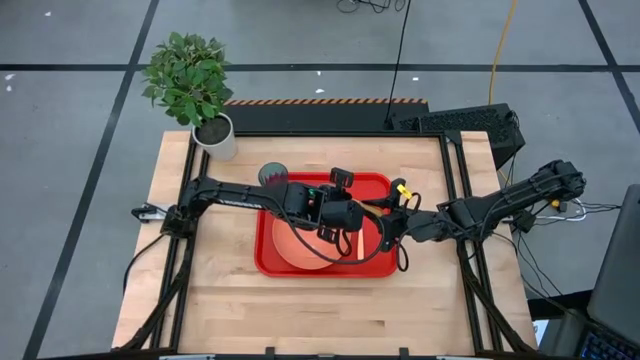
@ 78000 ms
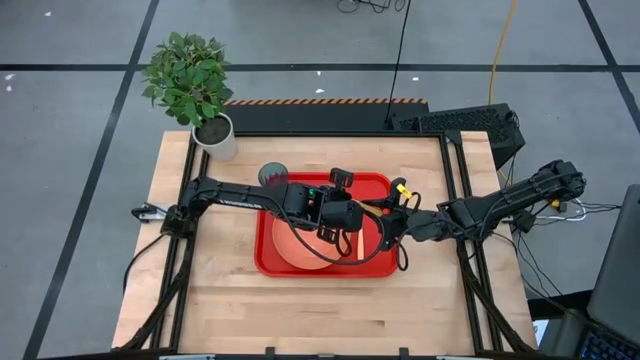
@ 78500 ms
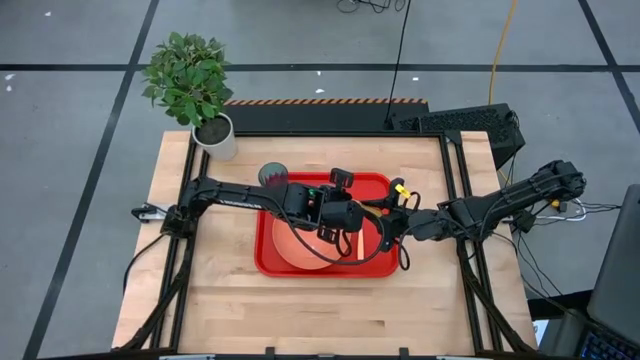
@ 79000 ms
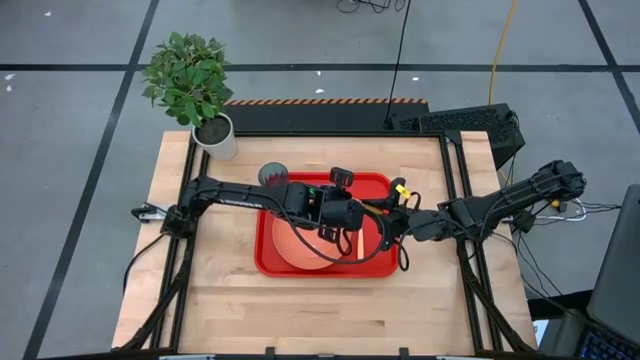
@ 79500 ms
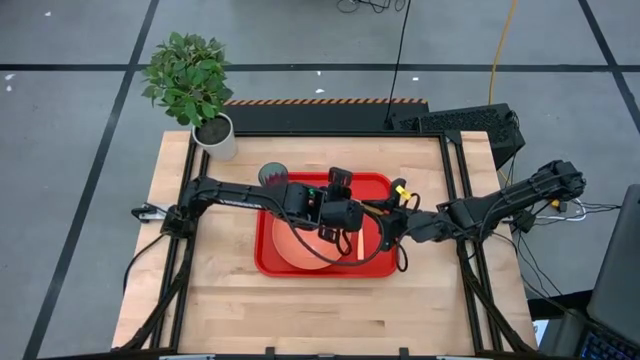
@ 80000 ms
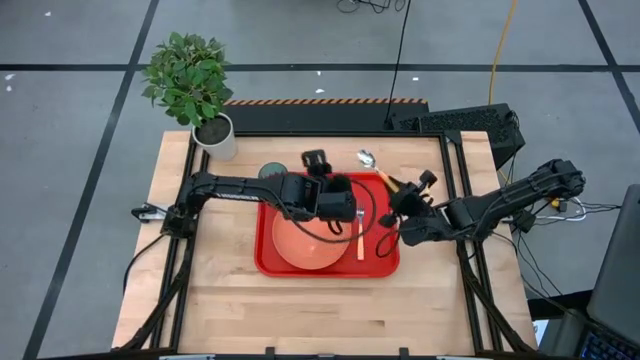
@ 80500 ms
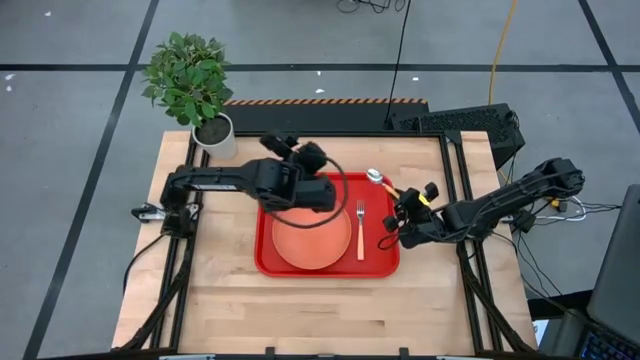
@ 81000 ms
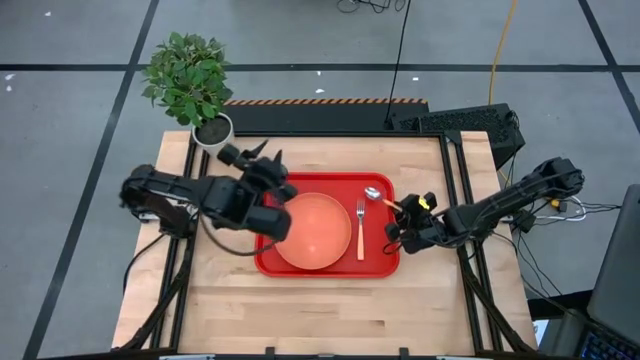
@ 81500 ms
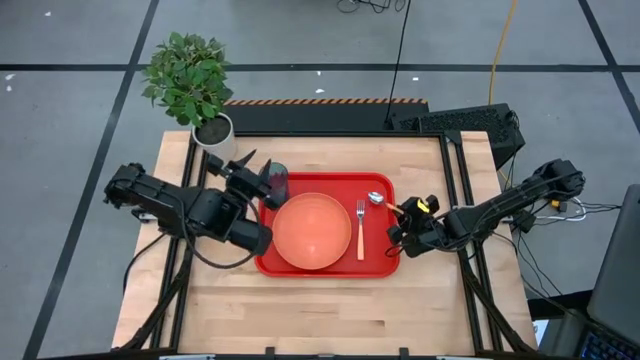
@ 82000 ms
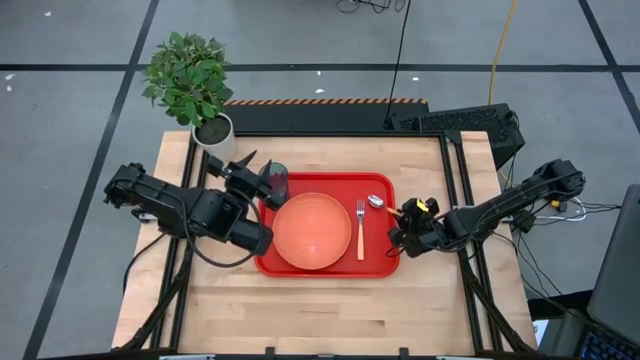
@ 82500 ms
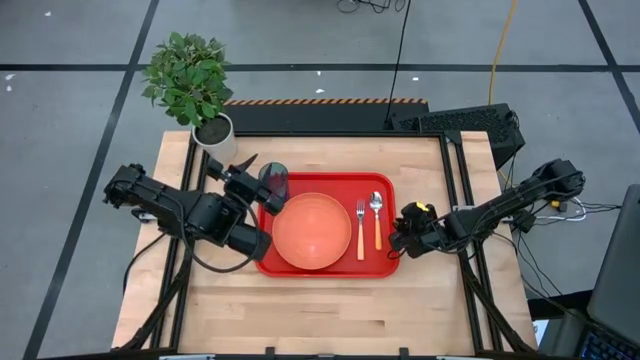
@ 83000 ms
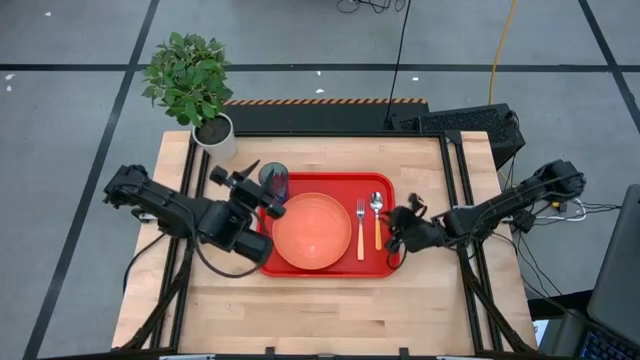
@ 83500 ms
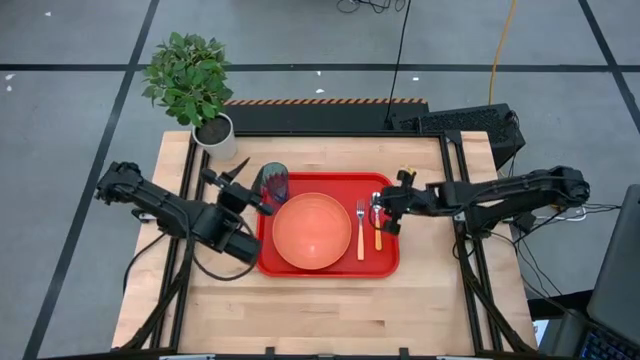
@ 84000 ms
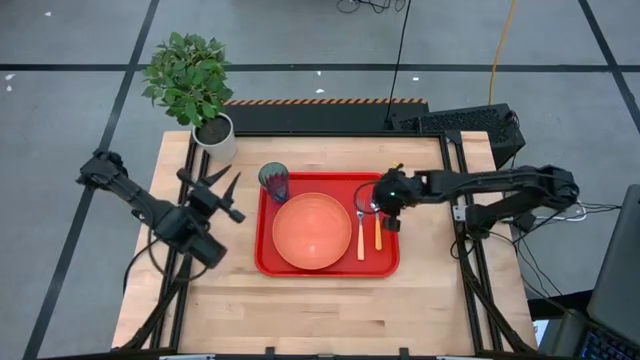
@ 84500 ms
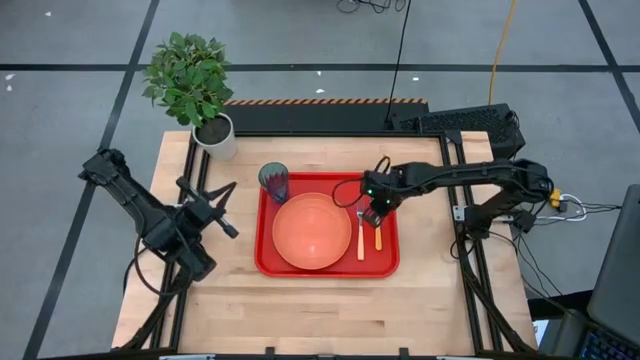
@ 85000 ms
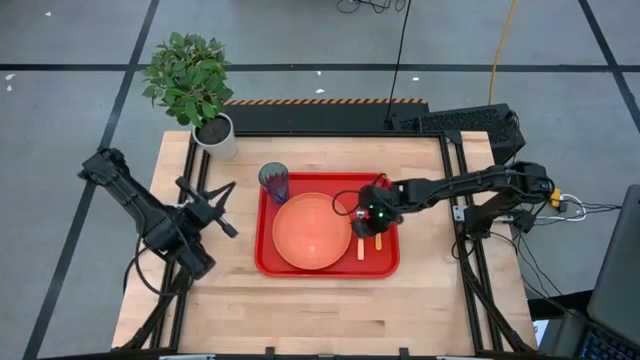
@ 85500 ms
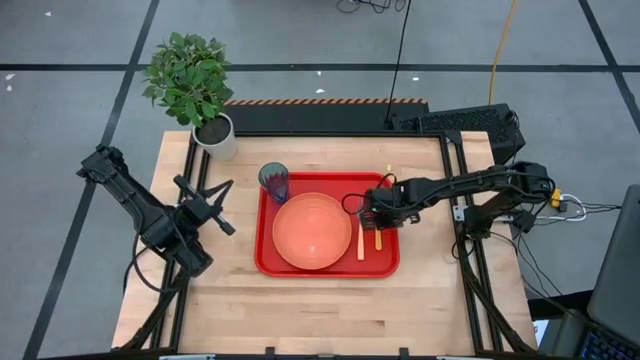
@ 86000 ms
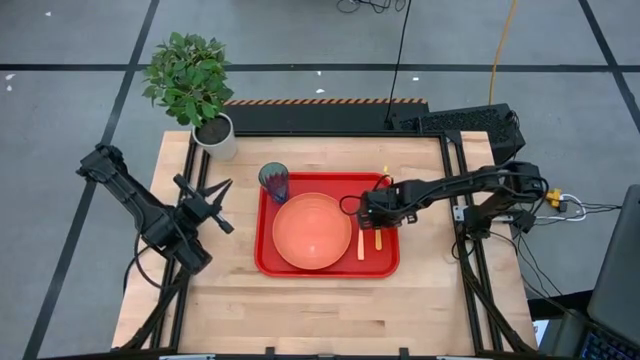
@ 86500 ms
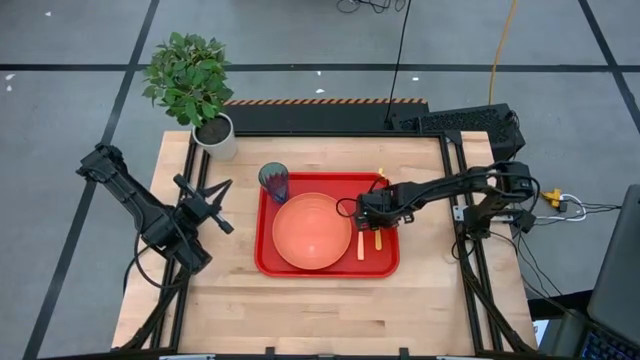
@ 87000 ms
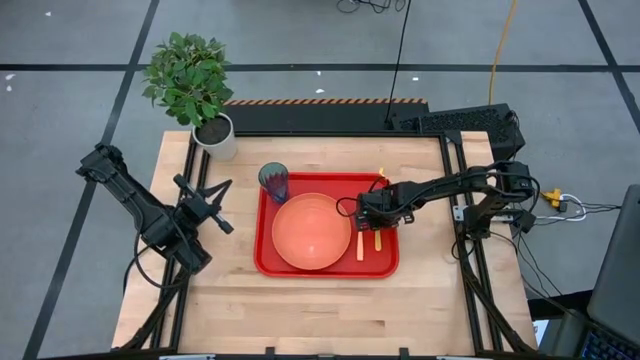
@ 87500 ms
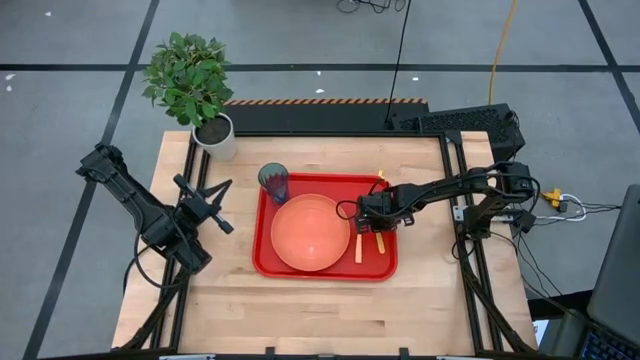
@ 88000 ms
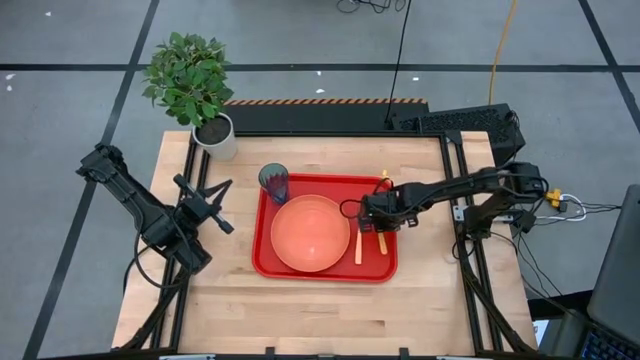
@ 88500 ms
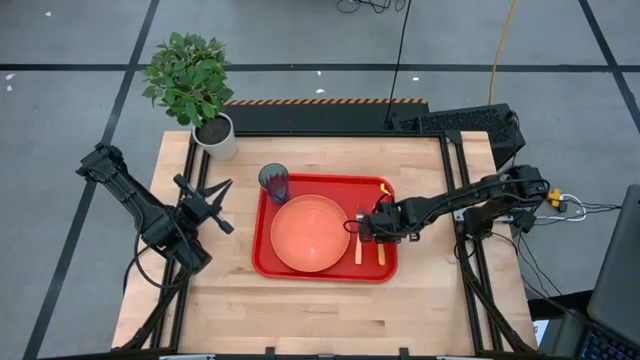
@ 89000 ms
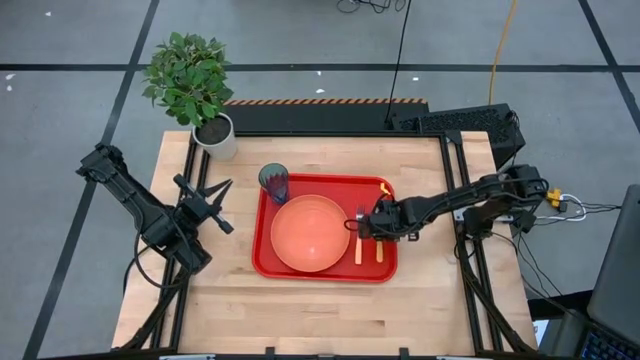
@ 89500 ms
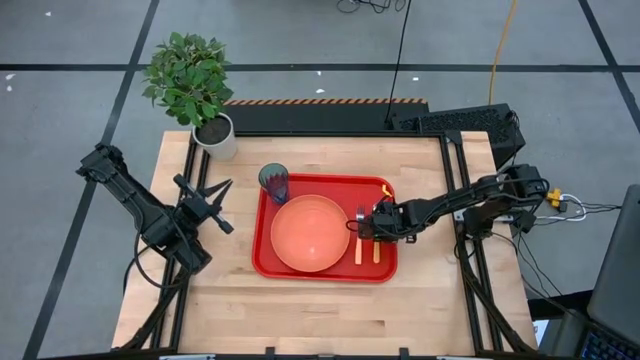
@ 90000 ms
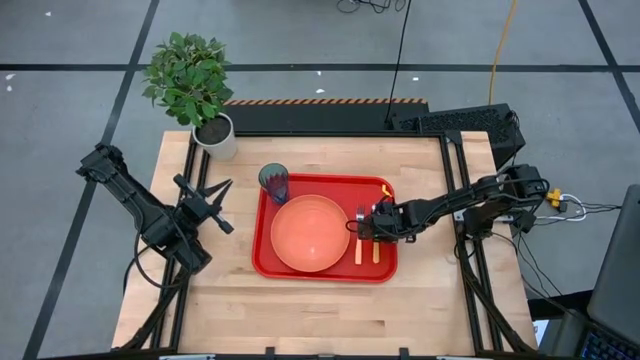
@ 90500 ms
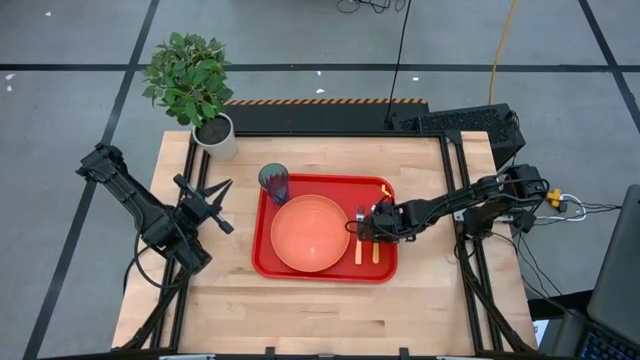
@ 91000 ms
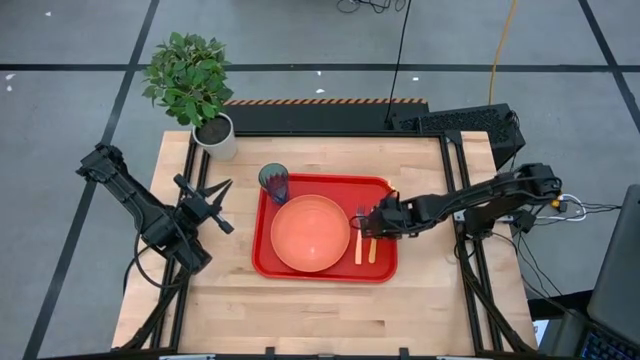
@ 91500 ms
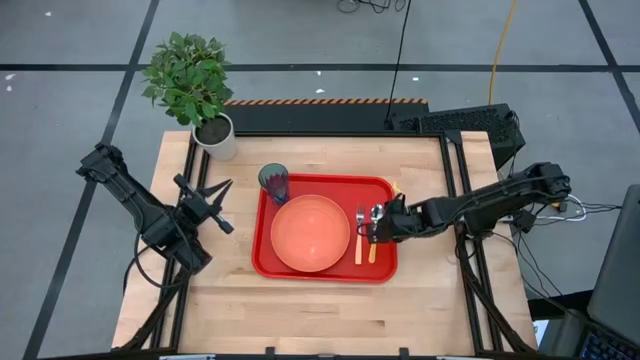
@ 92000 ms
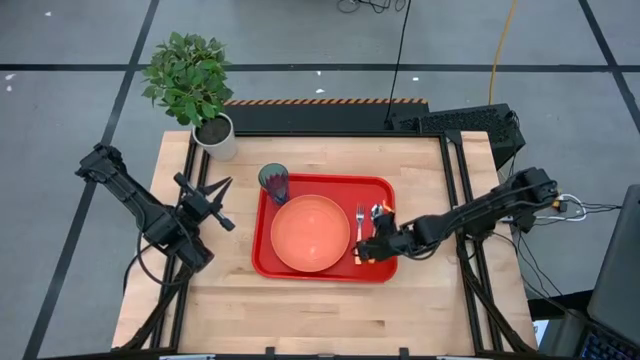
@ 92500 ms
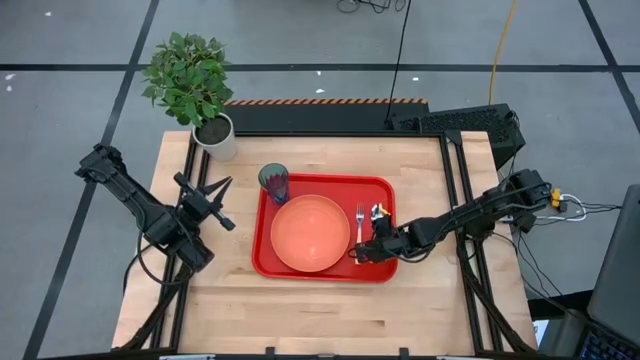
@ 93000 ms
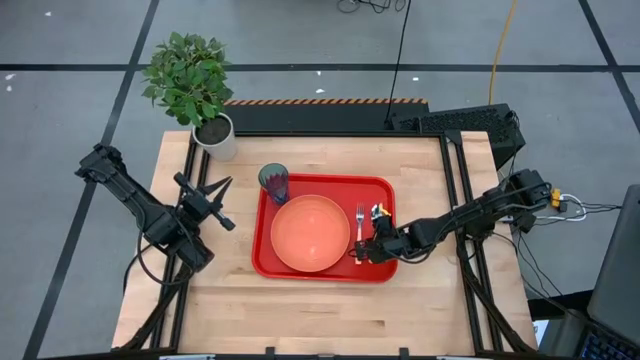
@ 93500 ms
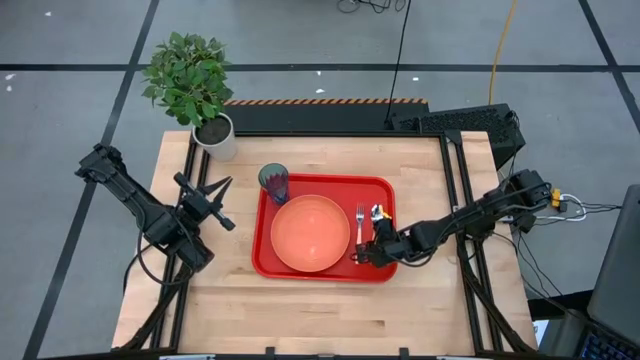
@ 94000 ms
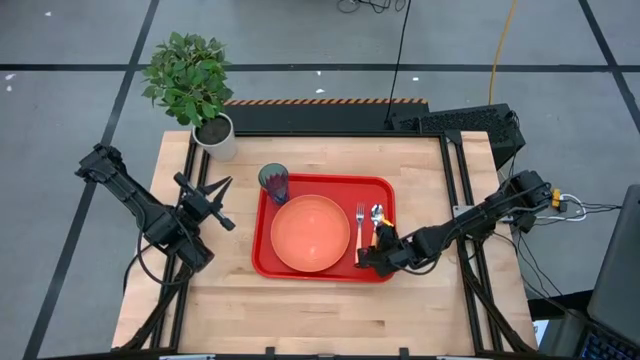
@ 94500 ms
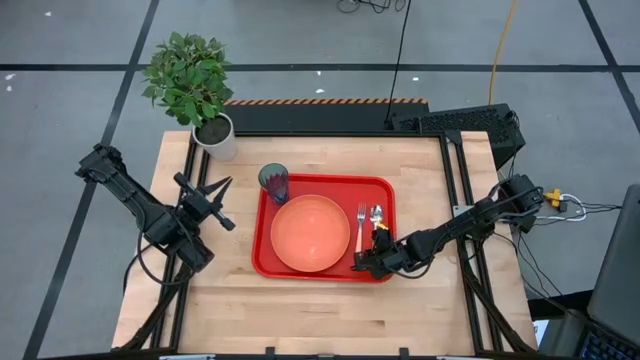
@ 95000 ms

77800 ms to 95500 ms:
Task: Pick and place plate/cup/fork/spoon on tray
Put the orange spoon on the red serving tray to the right of the yellow fork

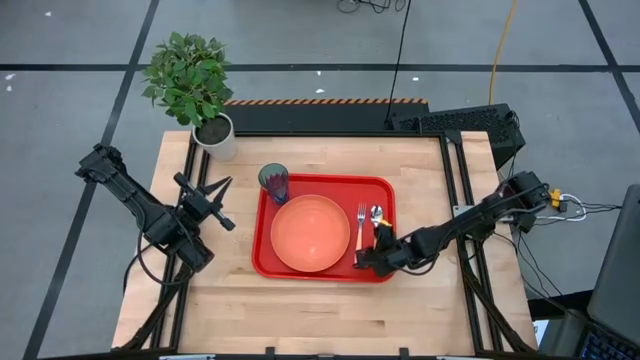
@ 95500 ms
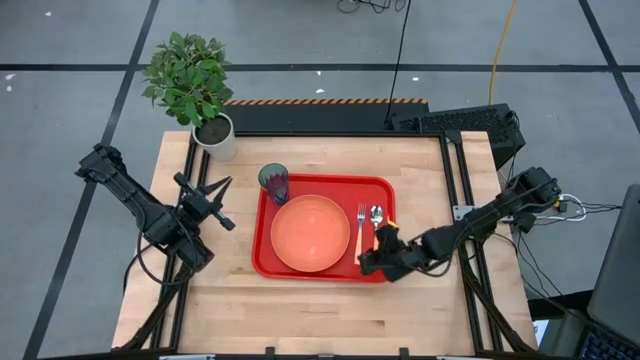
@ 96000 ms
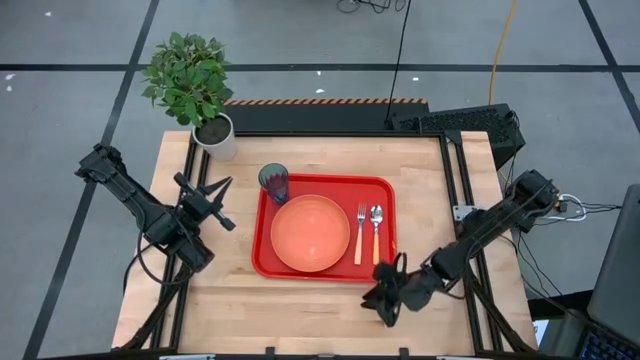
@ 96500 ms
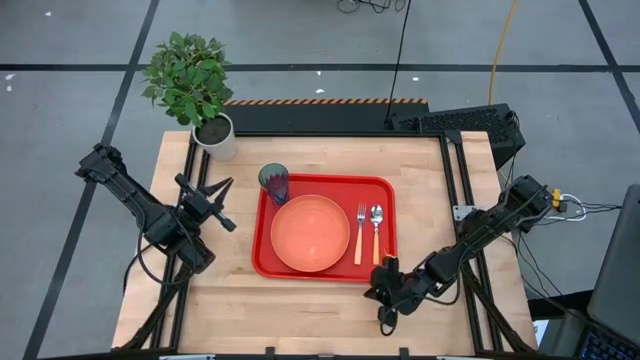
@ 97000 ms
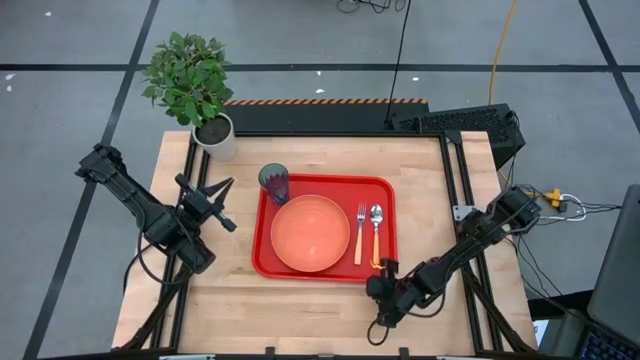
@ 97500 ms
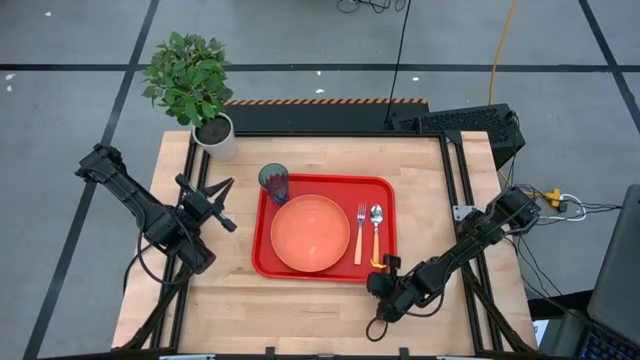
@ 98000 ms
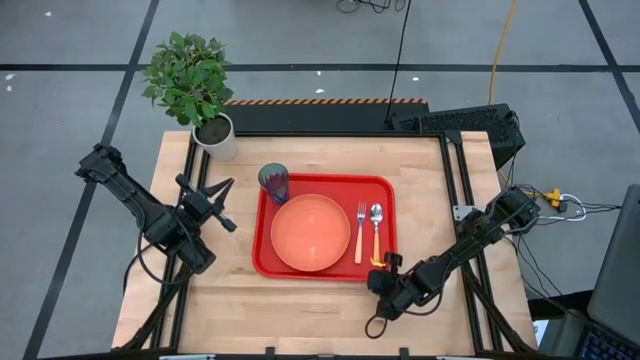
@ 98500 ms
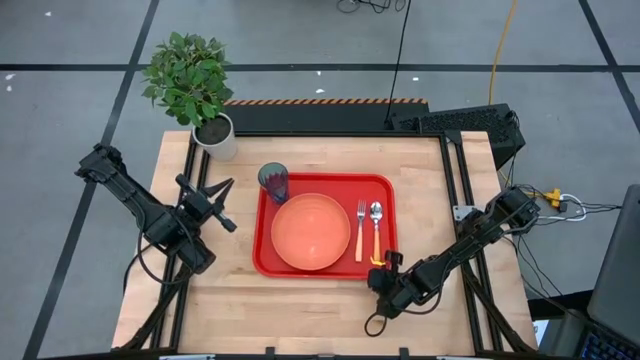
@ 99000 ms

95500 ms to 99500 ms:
Adjust the red serving tray

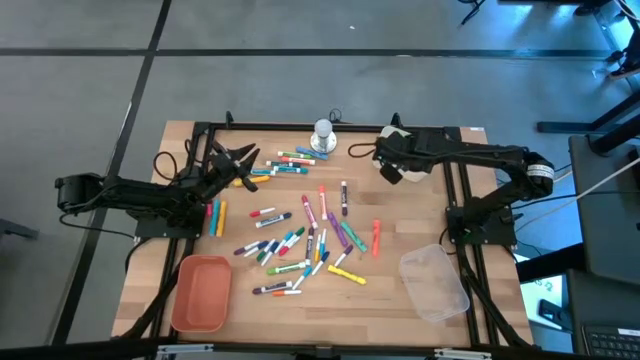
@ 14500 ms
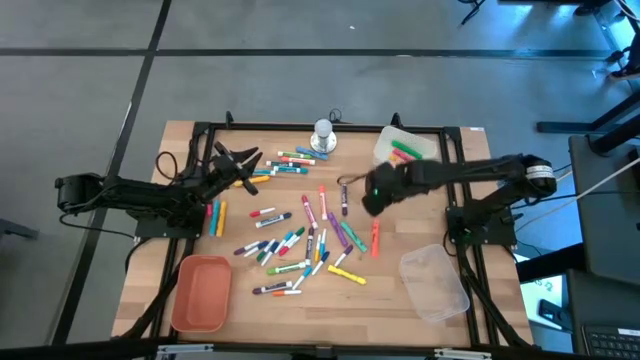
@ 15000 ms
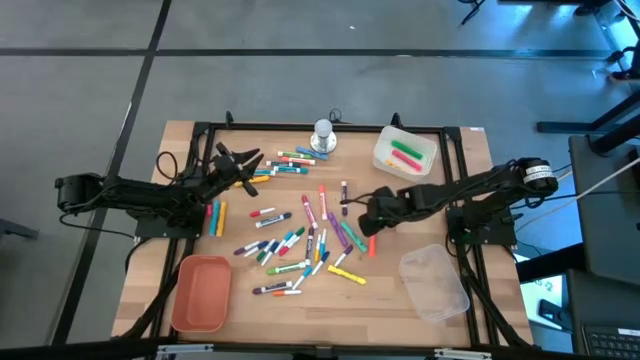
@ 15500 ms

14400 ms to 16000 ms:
Task: Pick & Place Markers
Put the large orange highlighter pen into the white bin
